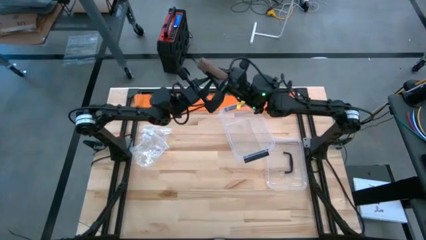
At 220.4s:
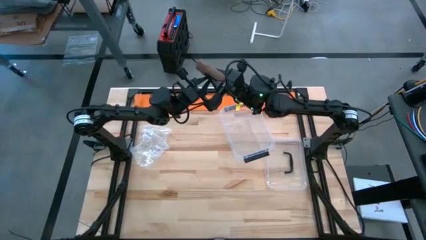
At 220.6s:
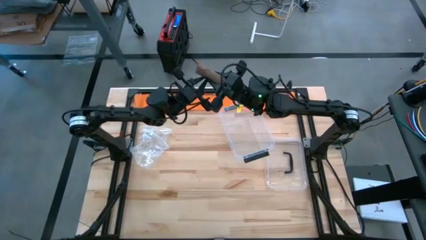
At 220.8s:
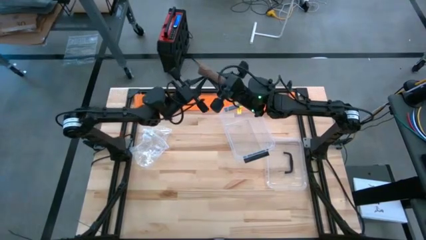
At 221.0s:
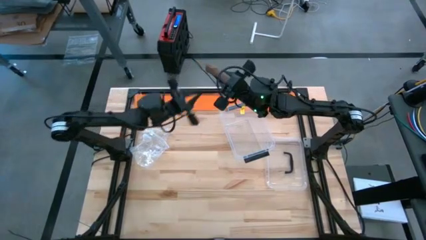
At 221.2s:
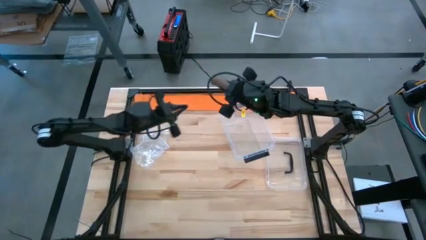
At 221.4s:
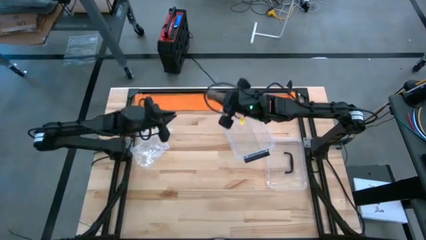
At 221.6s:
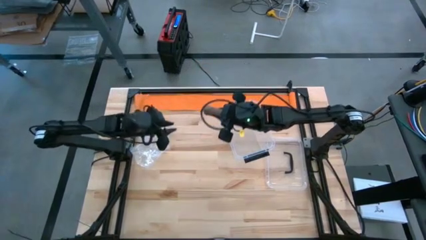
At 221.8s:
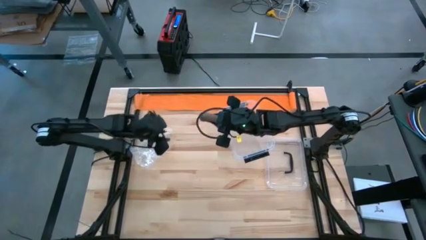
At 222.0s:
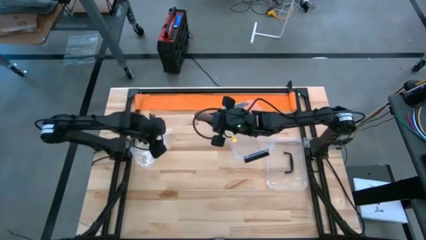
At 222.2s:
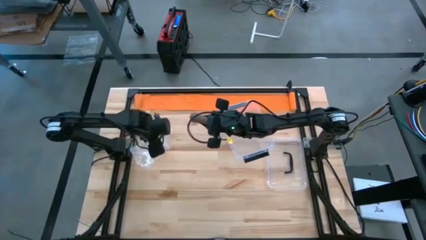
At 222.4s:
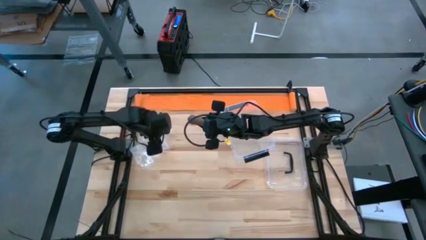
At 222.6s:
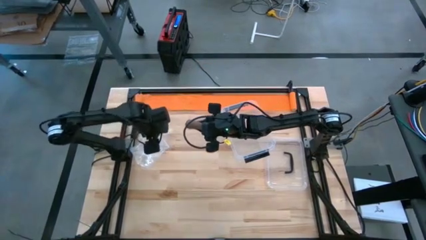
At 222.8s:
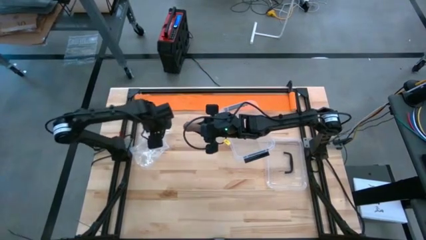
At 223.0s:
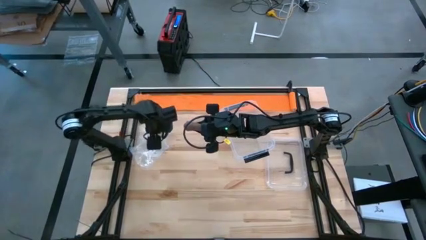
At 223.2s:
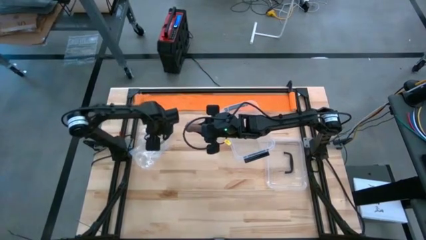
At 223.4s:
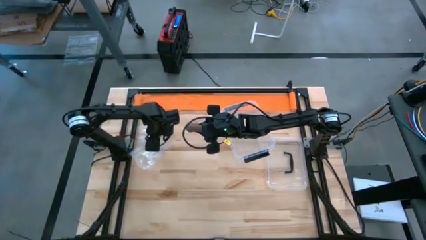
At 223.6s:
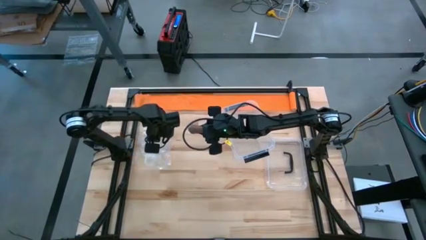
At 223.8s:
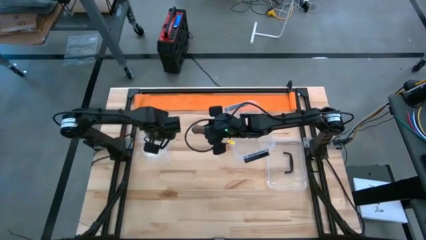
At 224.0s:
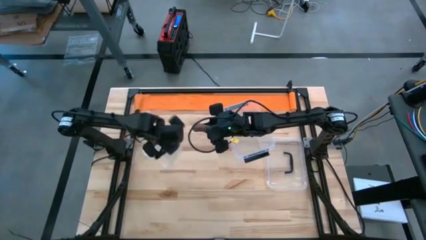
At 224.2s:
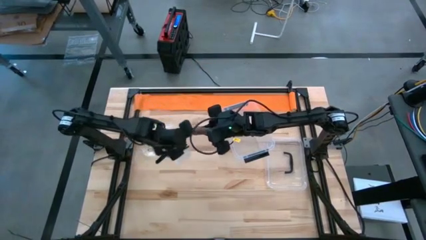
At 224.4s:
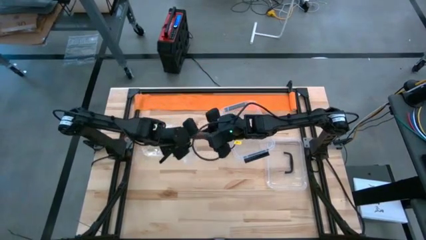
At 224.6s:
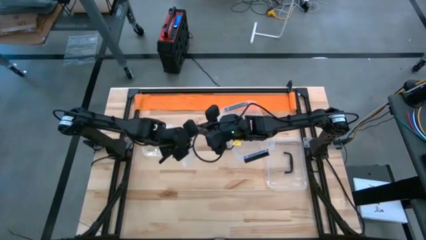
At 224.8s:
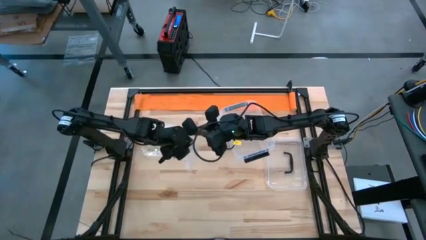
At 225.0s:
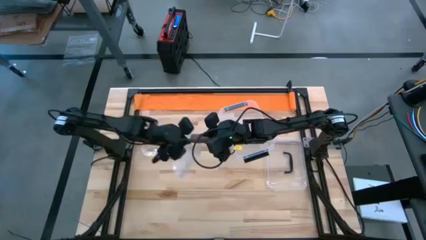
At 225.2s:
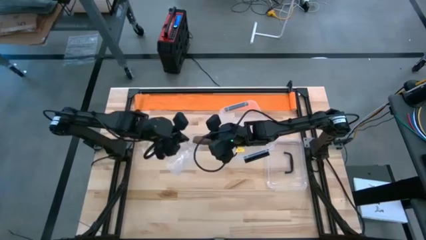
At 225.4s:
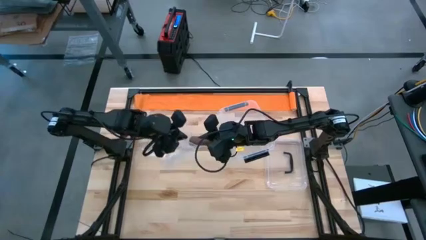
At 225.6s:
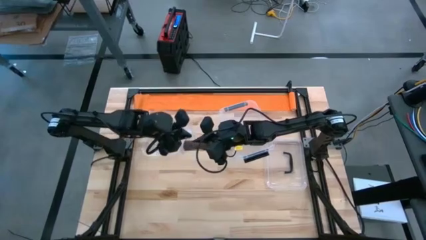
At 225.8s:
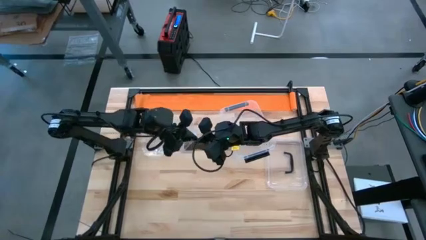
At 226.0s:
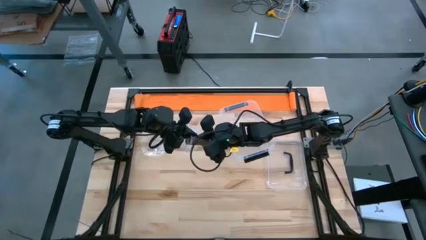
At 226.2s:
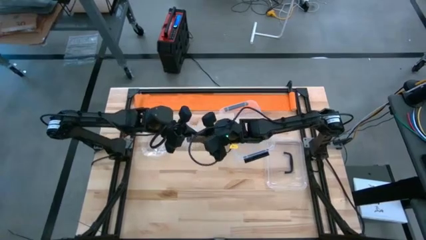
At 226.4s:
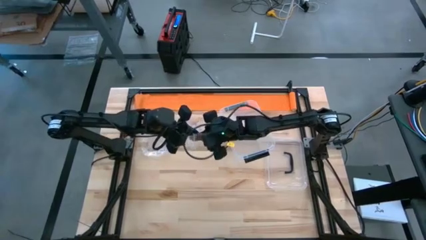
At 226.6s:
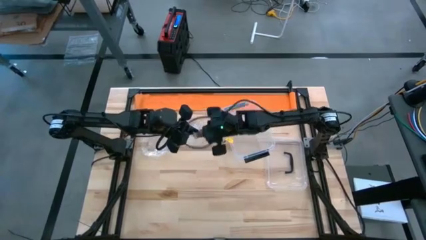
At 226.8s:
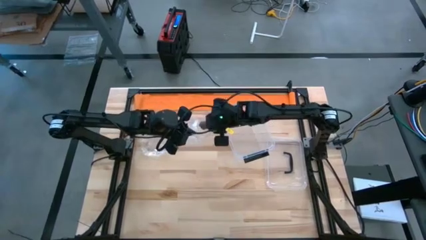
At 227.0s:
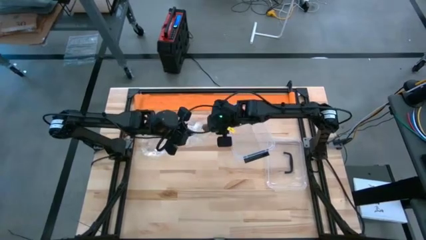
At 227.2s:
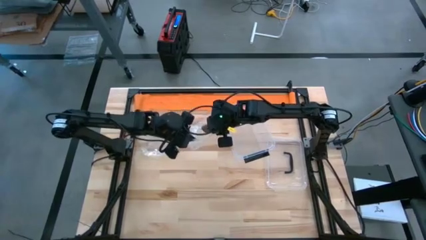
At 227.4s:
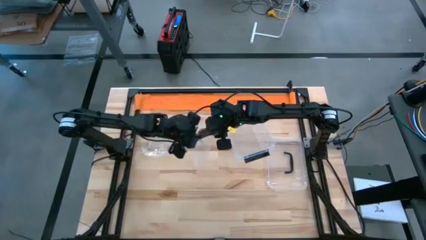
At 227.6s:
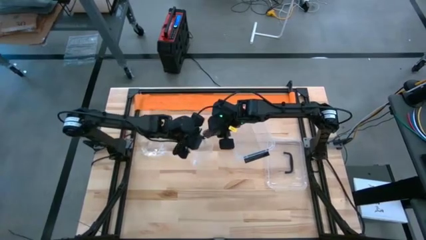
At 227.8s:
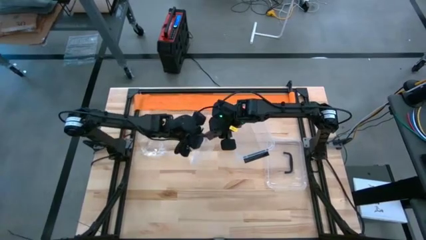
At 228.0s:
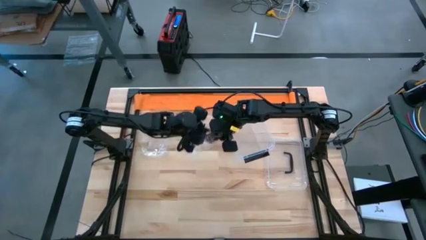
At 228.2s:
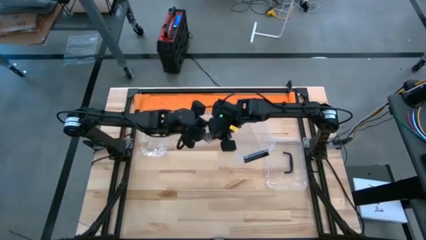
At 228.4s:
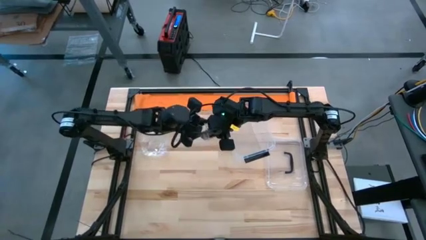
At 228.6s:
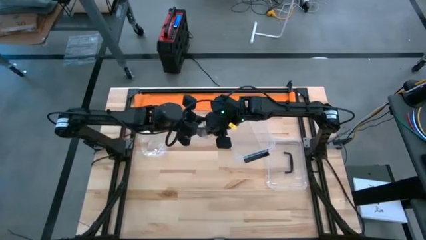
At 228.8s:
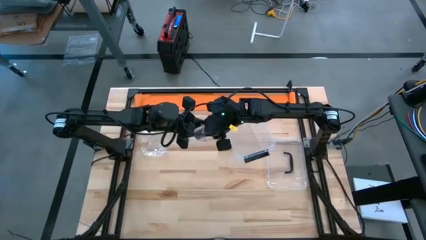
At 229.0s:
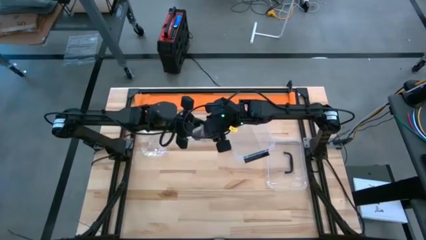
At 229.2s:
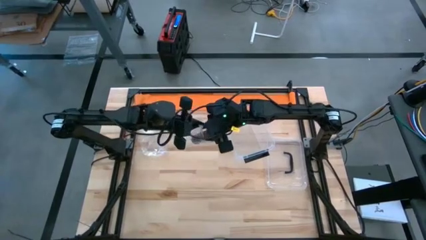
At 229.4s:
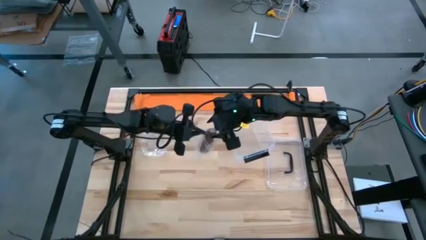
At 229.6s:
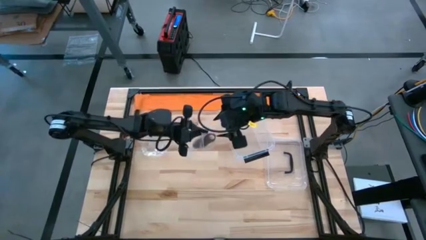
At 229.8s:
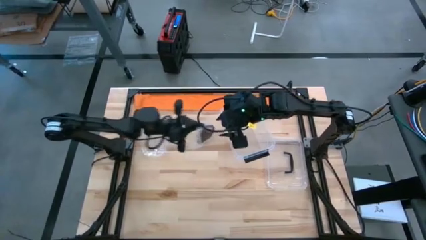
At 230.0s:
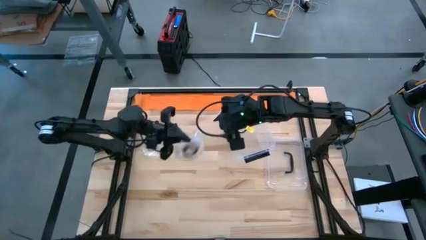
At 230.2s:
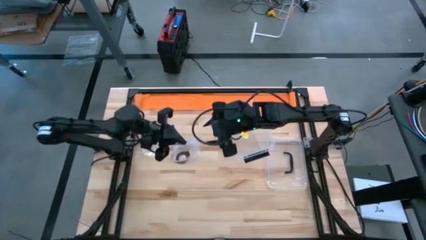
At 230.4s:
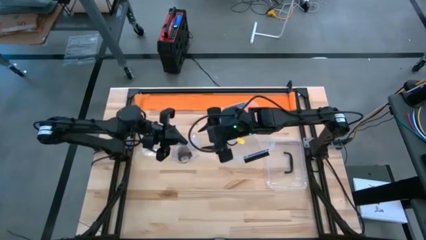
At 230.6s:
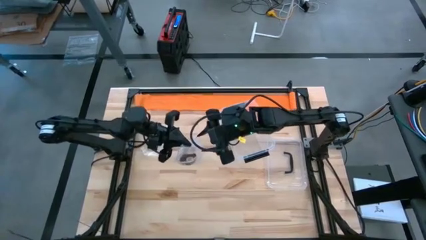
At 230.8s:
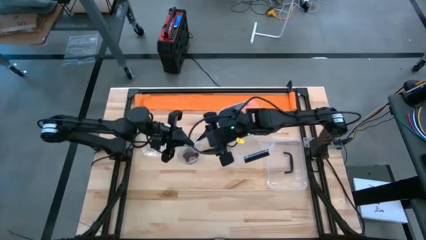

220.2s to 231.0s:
Task: Roll bandage
Put the rolled brown bandage into the transparent zip bag
